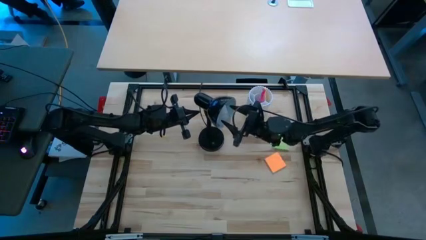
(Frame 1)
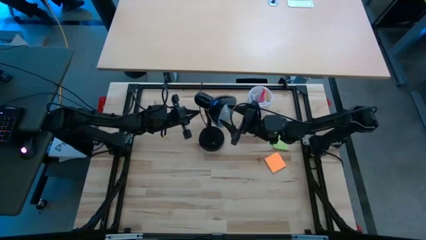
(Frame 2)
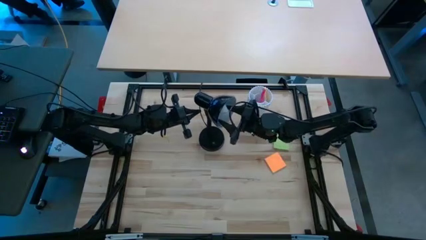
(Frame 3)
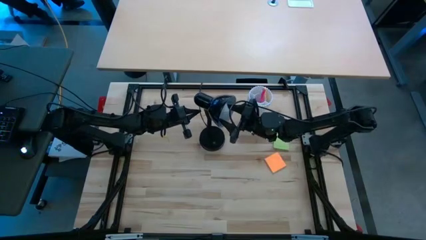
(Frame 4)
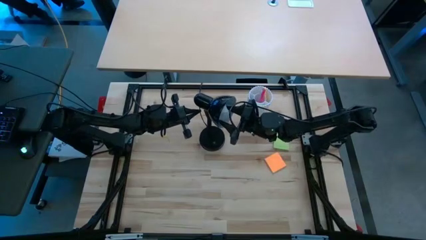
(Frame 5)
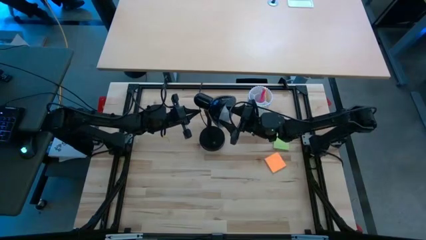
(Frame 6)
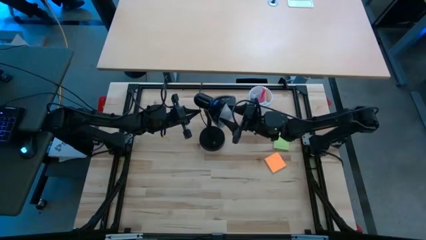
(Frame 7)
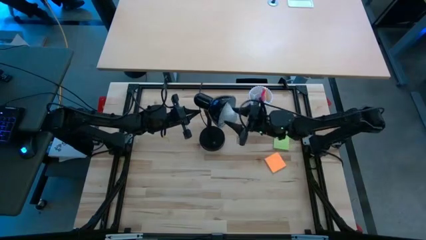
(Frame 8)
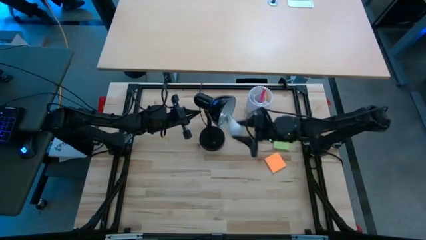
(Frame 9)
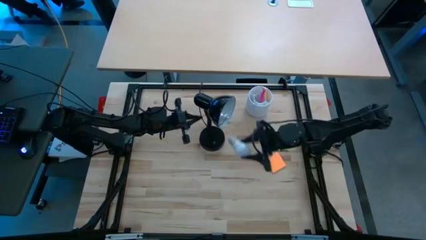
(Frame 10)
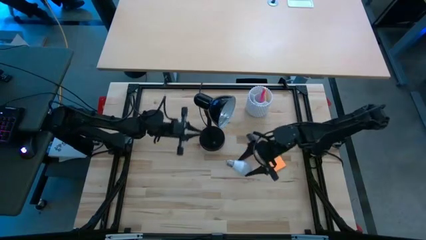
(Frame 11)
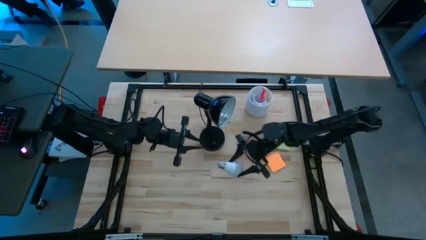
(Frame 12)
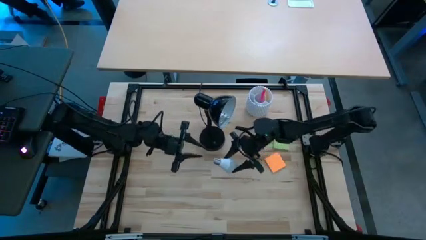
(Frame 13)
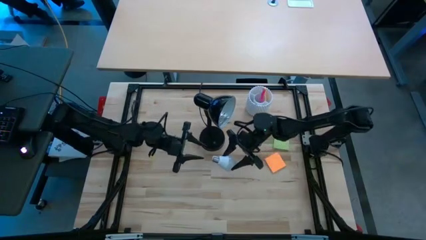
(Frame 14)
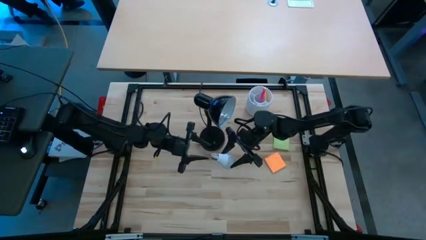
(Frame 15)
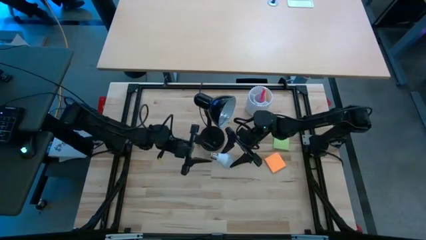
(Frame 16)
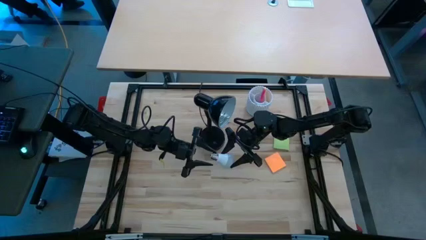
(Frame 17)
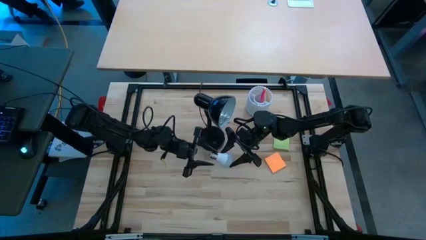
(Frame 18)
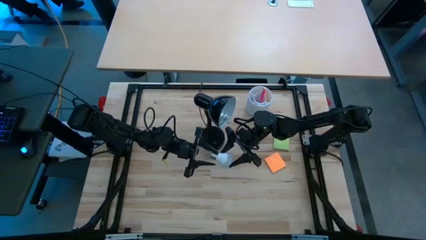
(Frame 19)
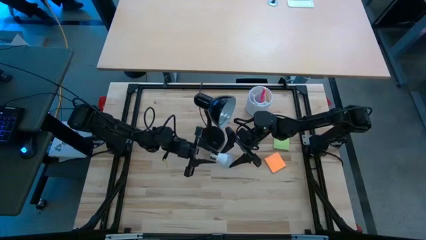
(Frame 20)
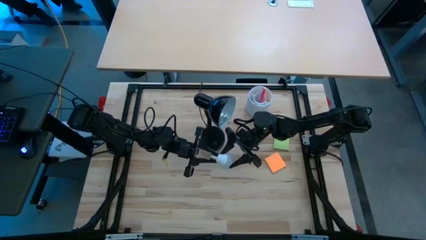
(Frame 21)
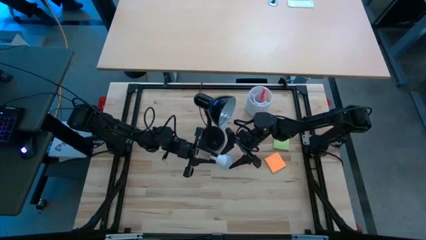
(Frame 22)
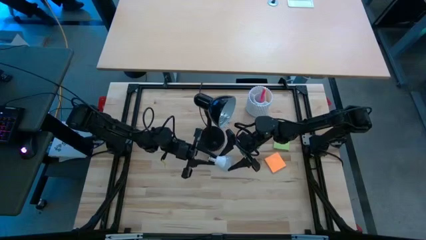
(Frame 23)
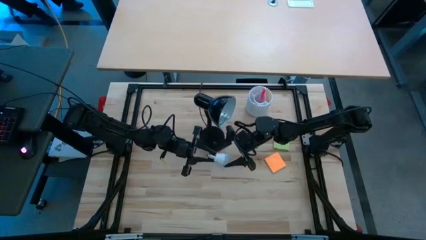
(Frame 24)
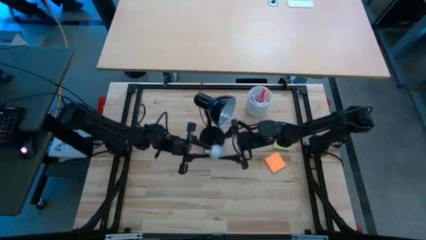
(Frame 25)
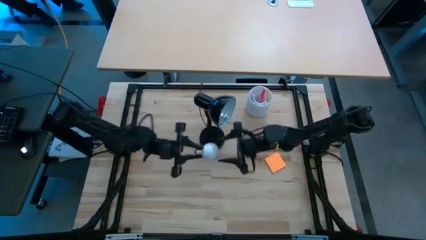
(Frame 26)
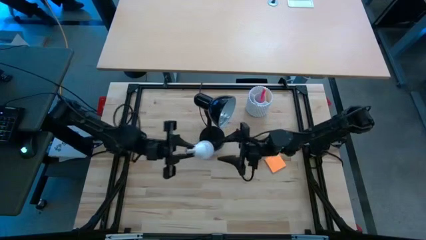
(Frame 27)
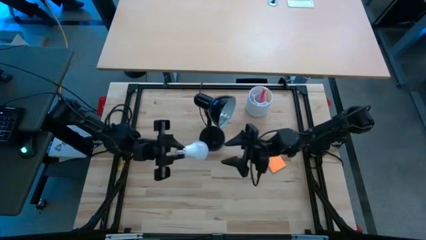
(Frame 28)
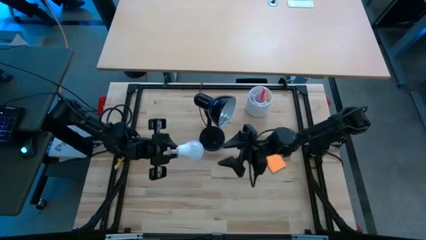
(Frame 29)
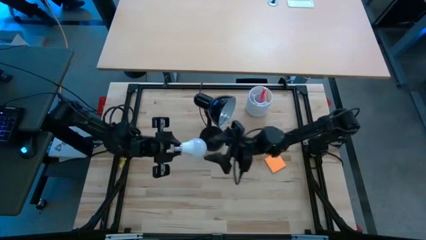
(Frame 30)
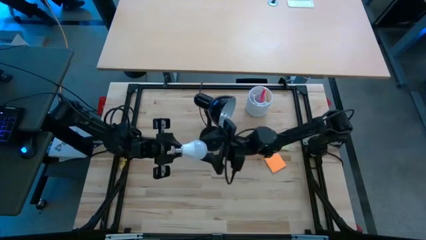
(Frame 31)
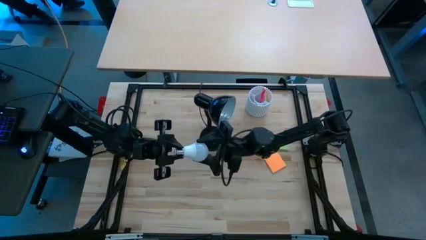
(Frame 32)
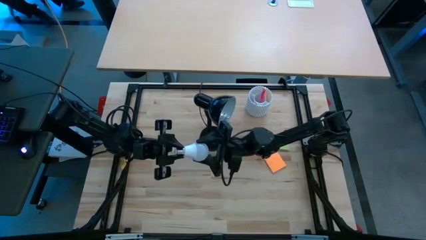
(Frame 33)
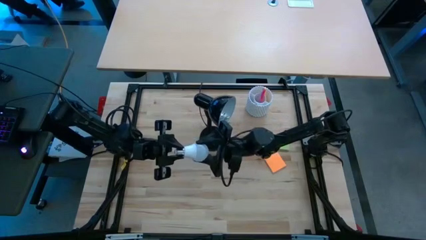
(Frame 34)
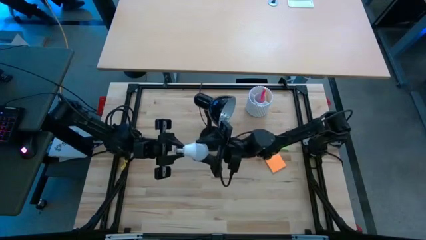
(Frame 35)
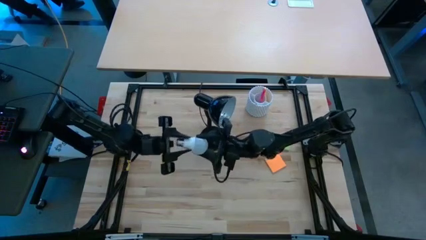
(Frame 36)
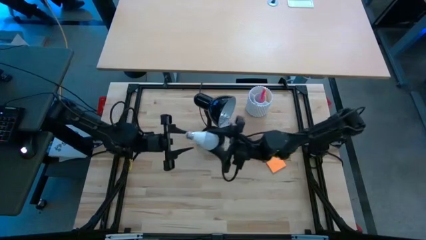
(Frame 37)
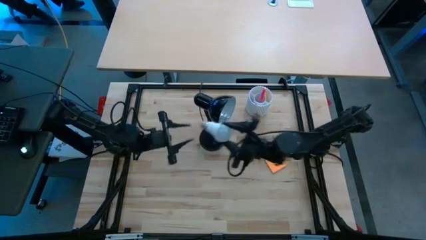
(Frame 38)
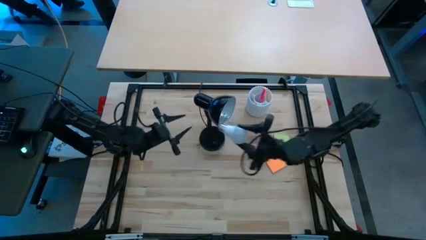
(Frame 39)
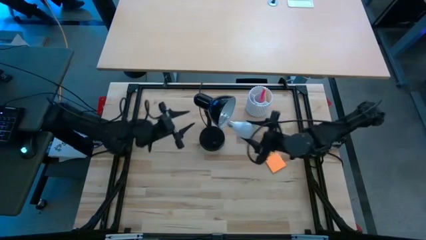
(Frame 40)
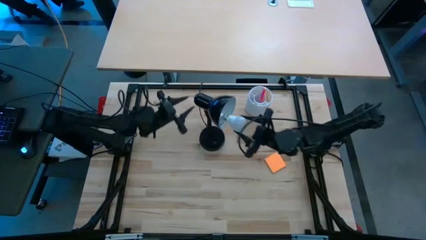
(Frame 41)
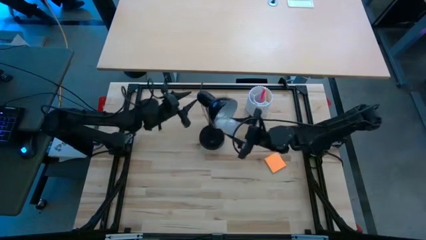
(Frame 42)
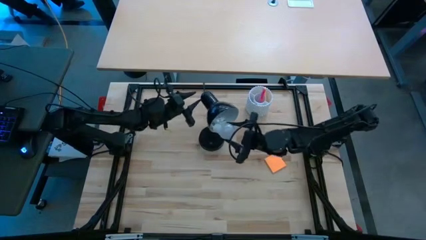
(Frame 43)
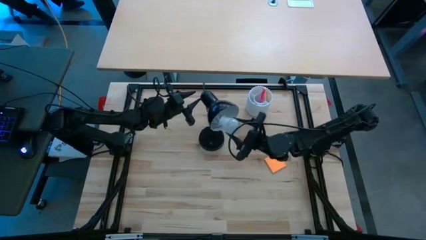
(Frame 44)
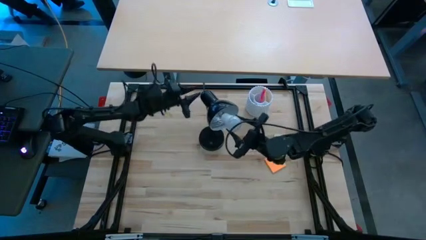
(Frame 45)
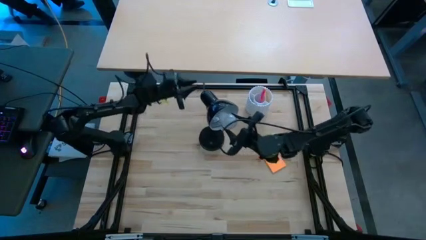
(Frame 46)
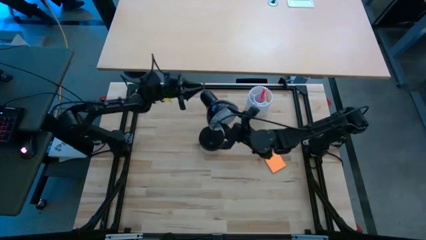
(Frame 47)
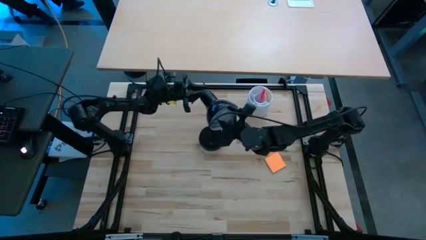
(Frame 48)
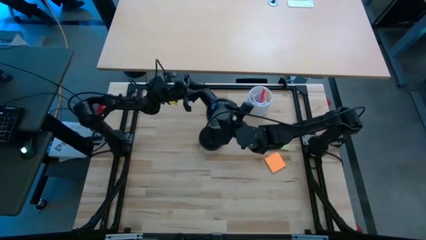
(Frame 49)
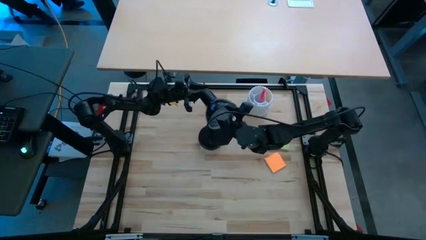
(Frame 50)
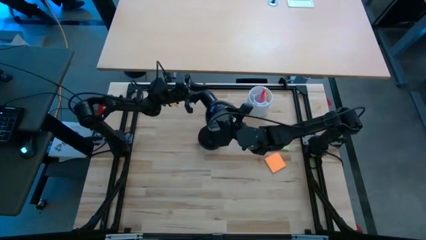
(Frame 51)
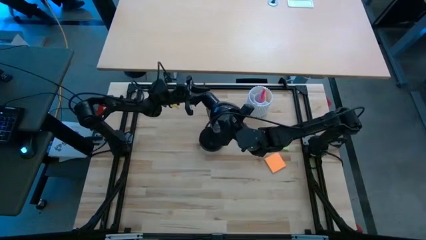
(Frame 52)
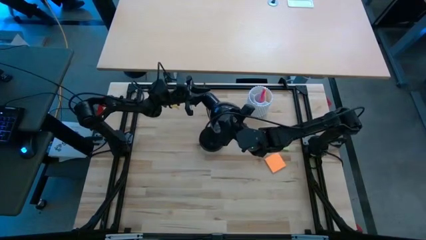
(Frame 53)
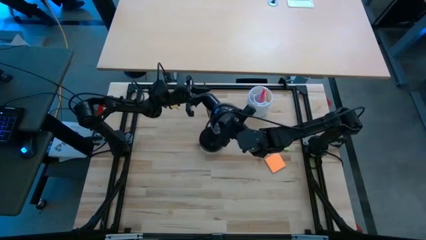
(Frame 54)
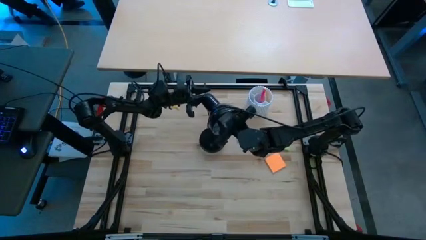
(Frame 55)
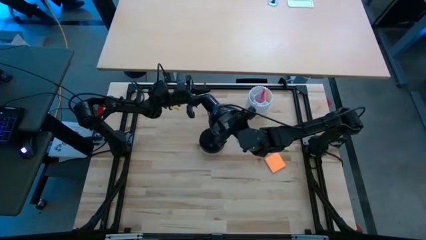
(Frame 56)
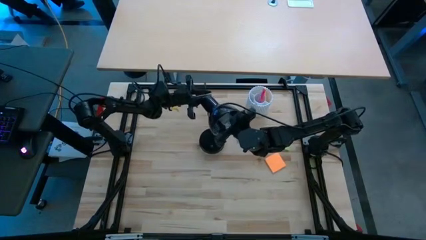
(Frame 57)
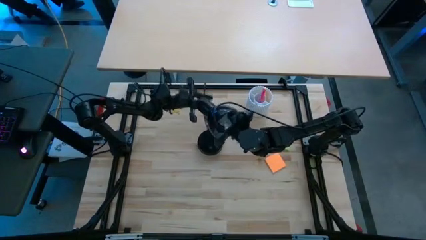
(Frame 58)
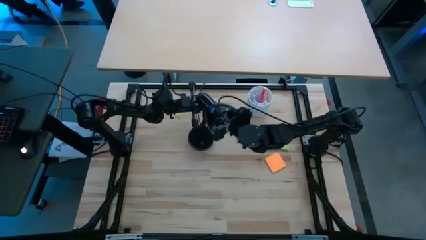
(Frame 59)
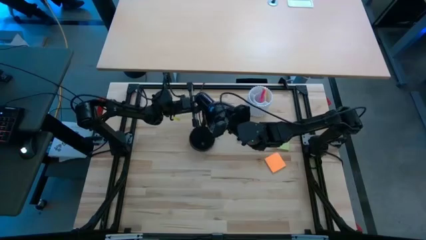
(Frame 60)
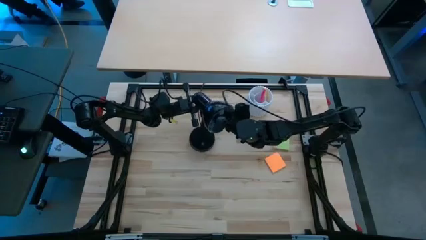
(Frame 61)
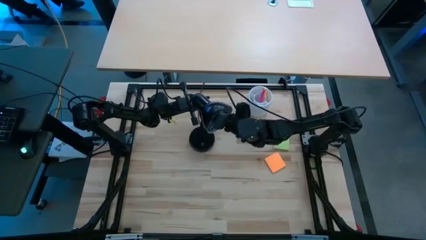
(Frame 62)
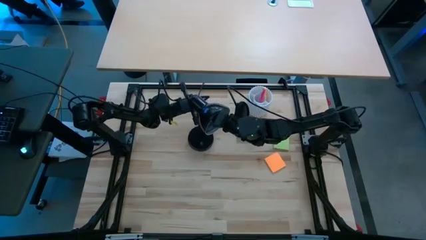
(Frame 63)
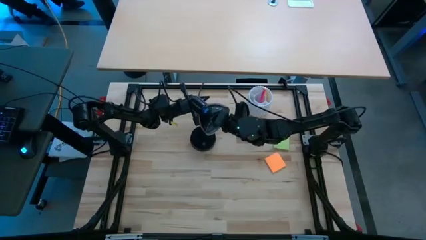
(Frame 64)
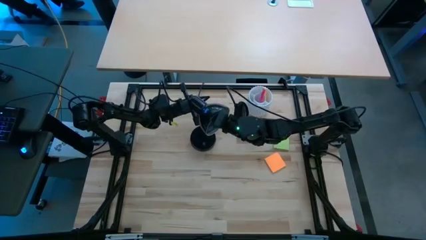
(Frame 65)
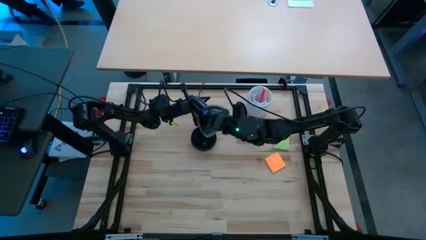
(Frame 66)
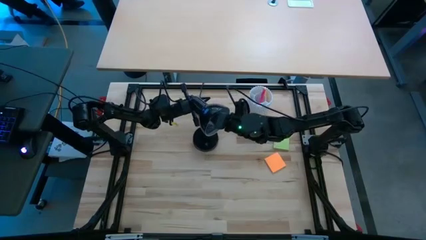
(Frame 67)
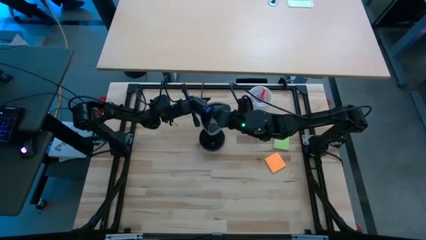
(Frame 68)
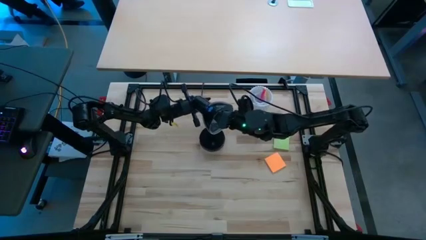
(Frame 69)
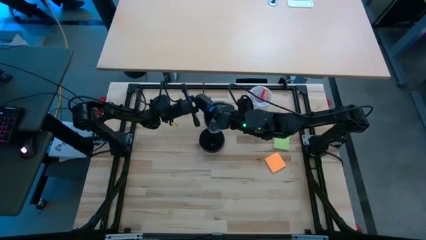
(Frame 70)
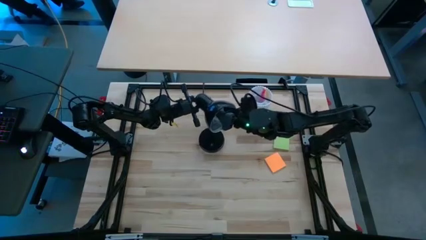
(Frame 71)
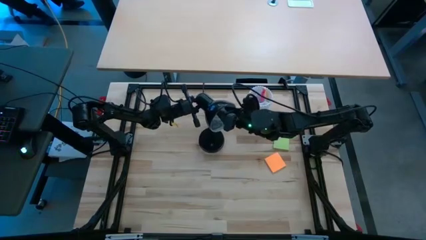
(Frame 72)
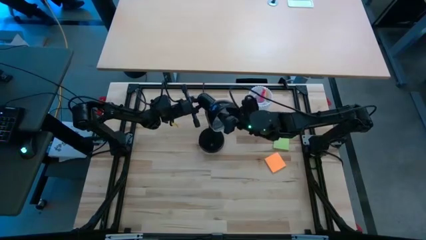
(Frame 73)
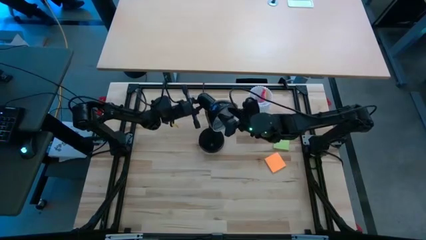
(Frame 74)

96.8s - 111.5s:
Task: Screw lightbulb
Insert the white lightbulb into the black lamp

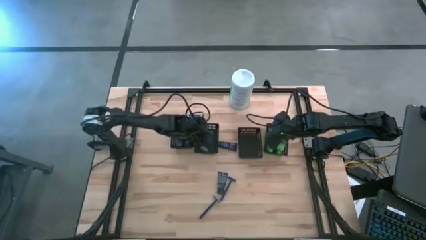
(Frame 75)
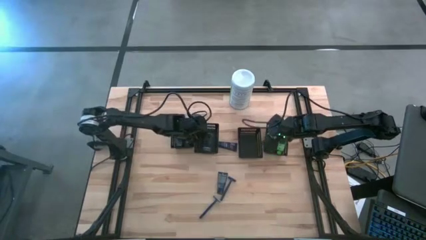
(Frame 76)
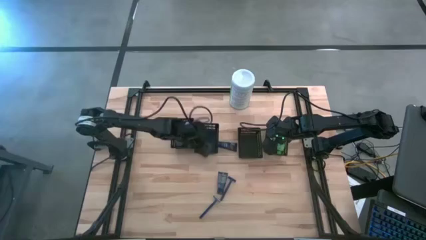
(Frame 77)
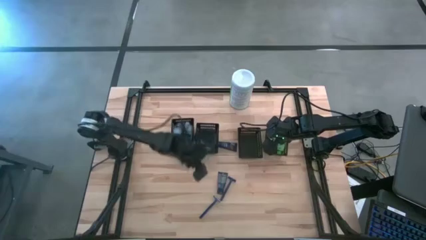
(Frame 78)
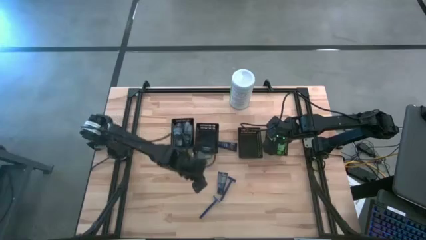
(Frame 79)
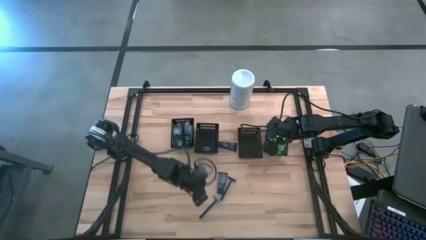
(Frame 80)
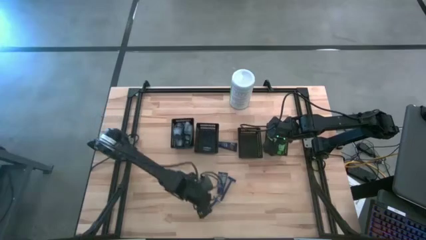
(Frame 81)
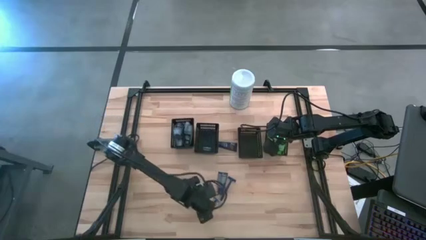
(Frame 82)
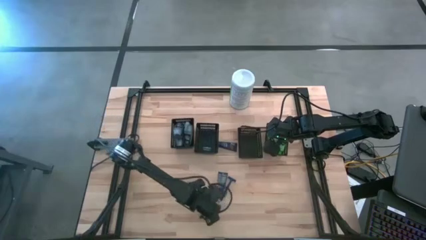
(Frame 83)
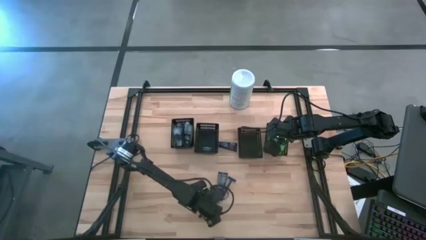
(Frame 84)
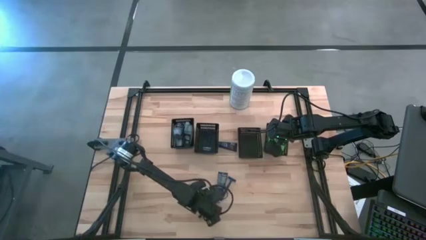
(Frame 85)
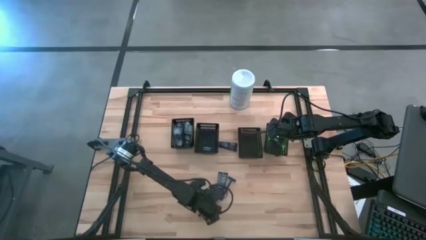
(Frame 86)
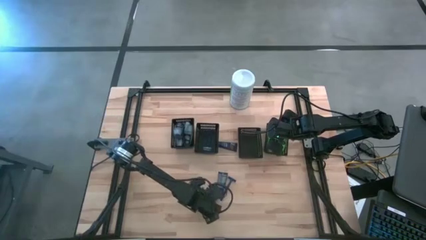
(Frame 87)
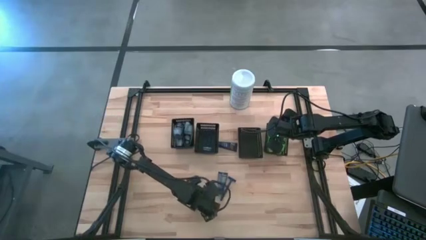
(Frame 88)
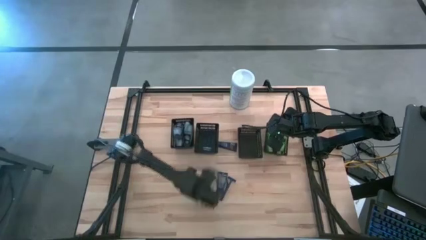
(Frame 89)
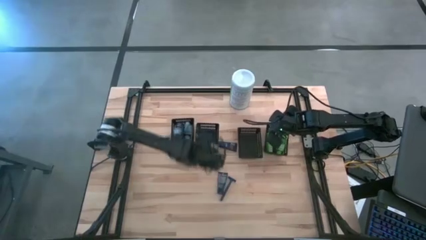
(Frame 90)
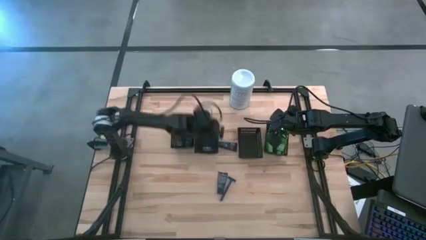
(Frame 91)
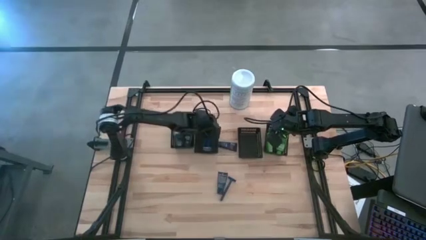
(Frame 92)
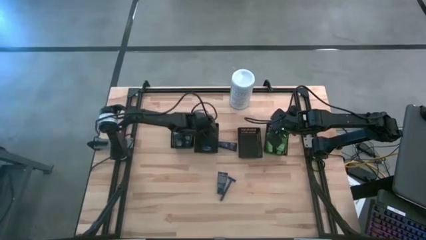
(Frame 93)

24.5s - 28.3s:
Task: Pick & Place Travel size toiletries
Put the blue razor into the middle left black bin
